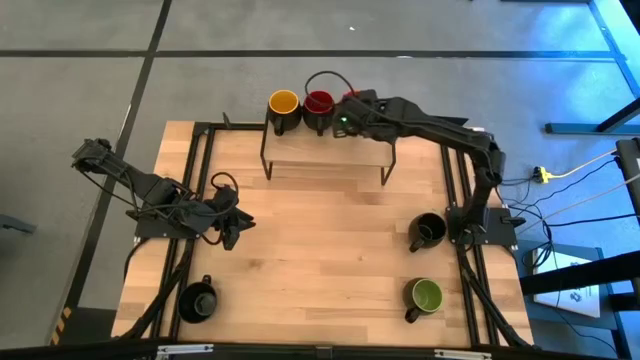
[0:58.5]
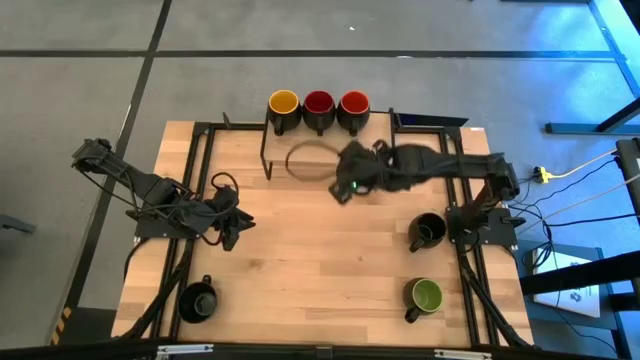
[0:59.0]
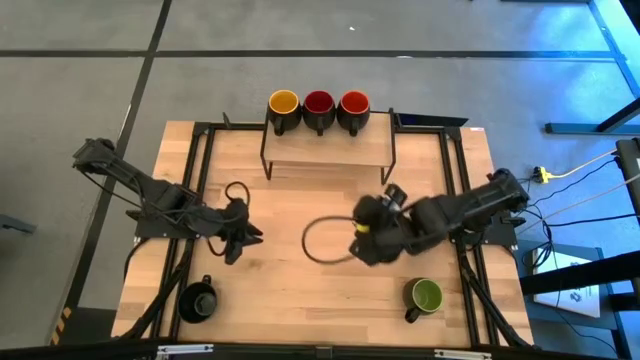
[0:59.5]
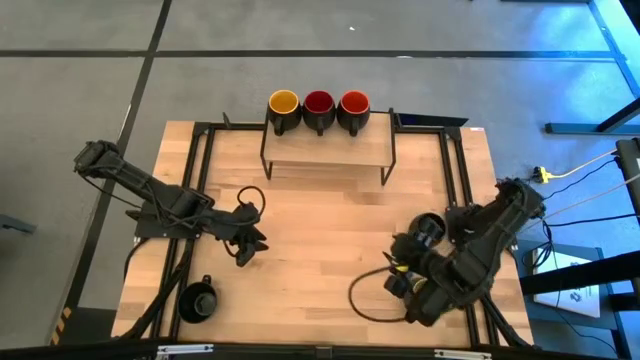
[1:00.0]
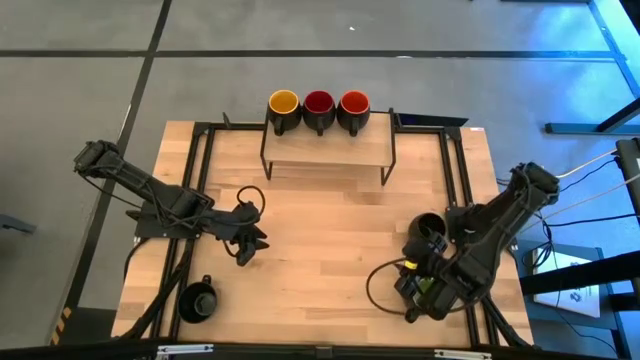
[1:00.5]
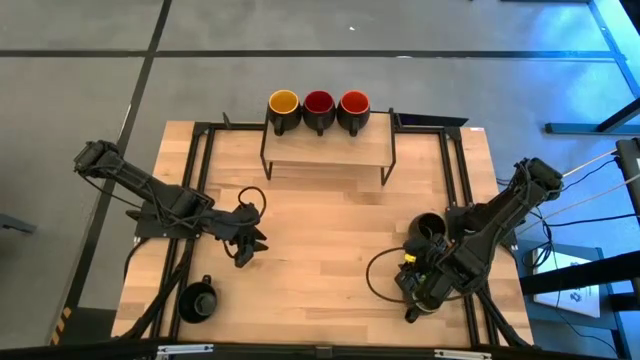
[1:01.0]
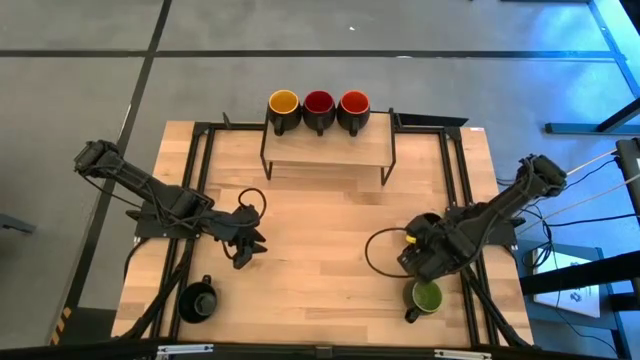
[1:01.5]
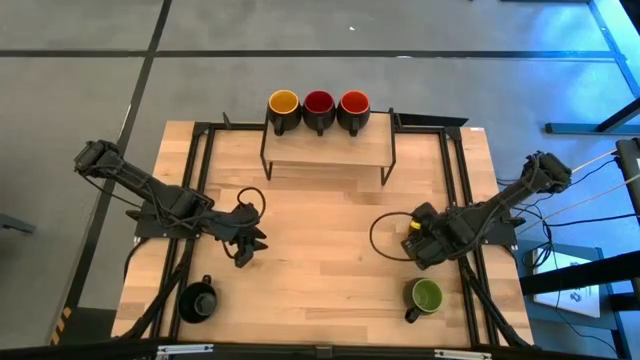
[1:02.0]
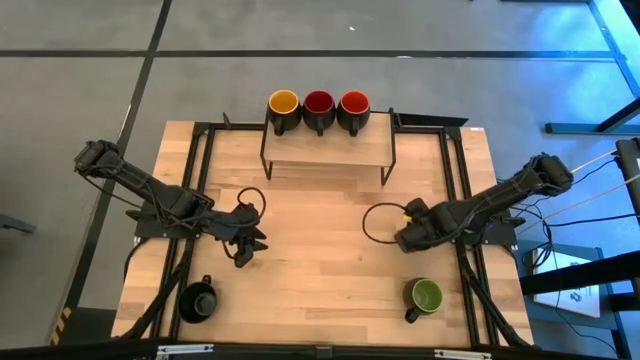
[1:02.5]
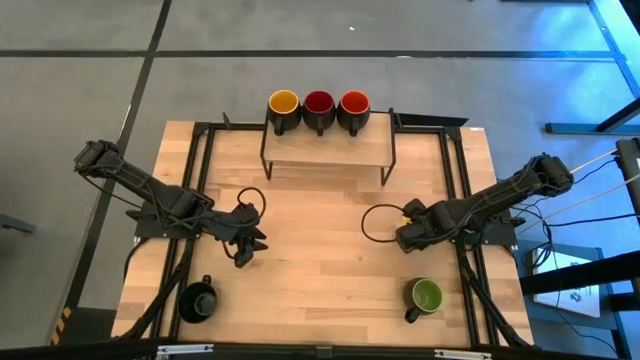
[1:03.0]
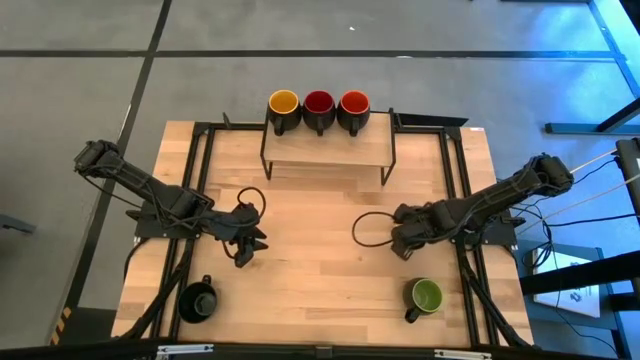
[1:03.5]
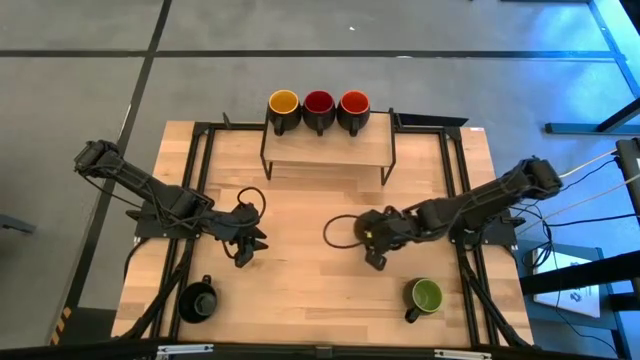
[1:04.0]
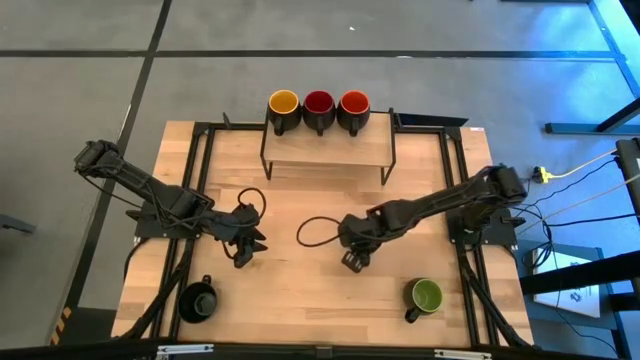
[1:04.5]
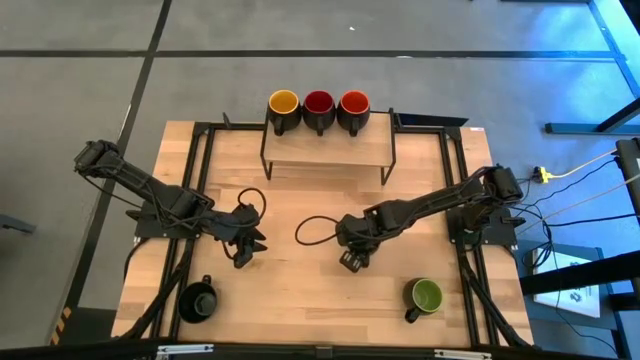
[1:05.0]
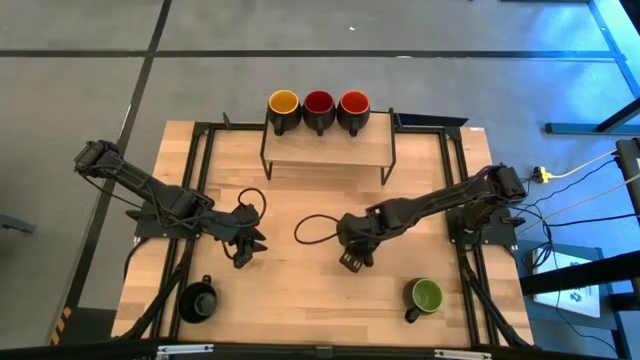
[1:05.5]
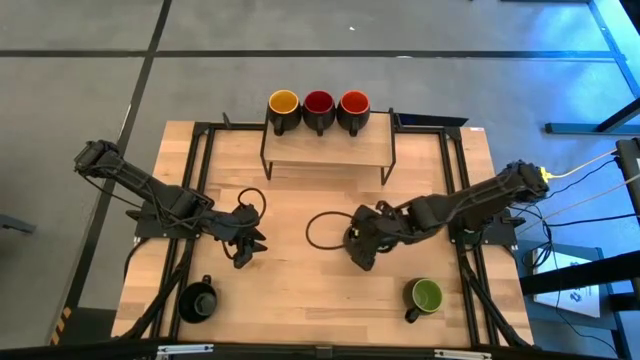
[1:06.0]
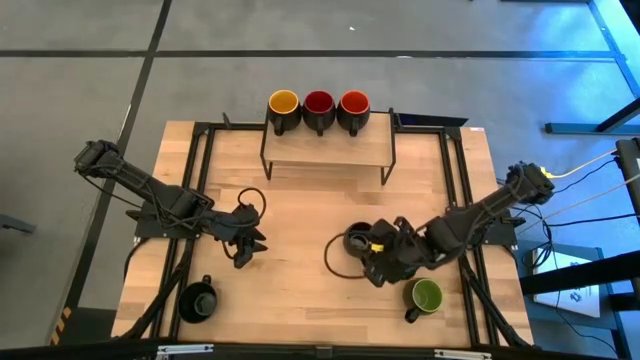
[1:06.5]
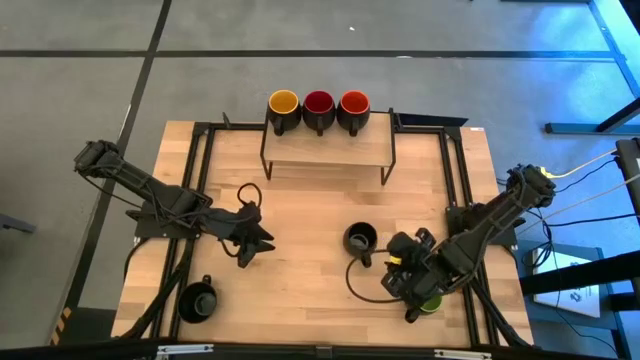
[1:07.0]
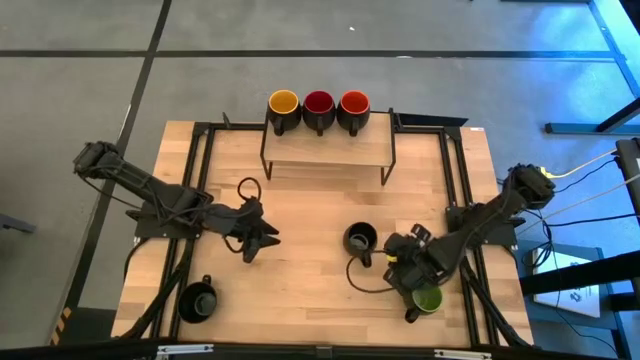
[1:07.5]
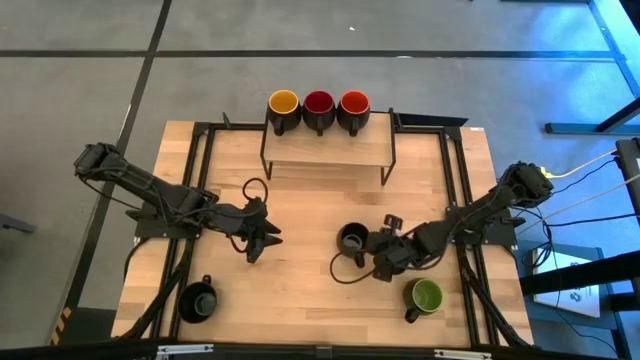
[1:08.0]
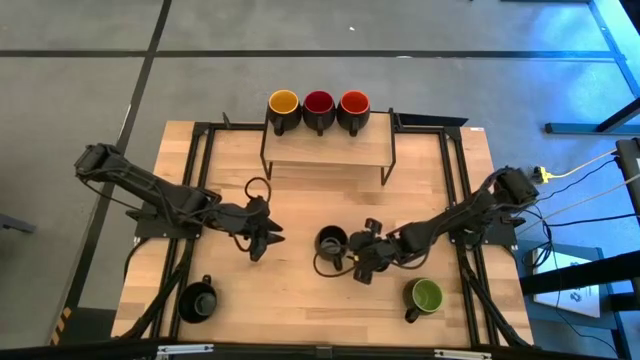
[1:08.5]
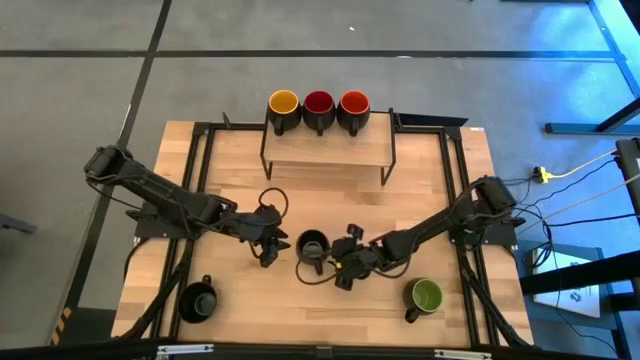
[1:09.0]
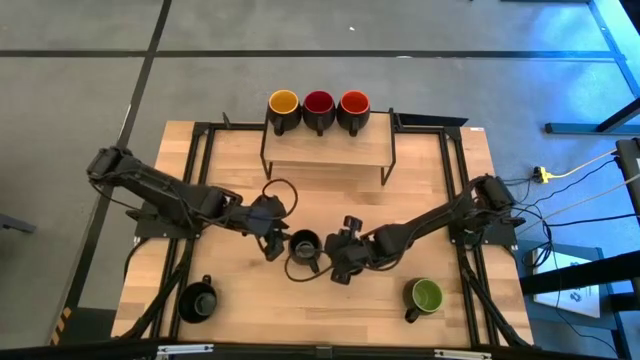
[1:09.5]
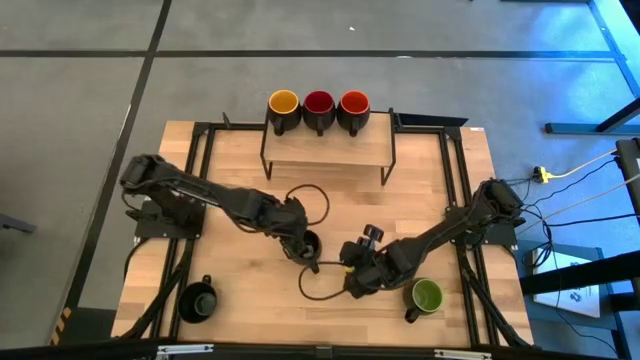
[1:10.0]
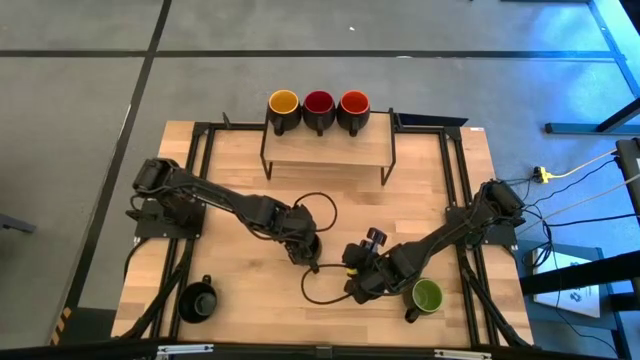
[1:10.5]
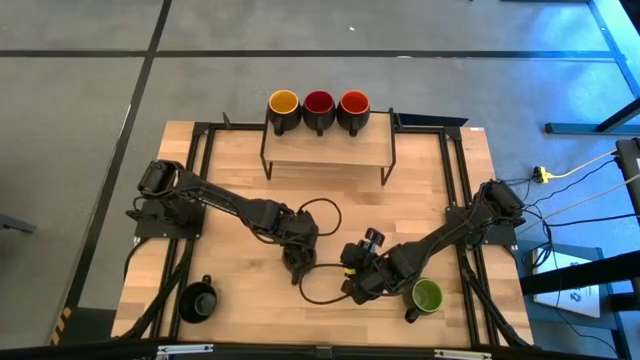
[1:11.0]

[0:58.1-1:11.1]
Task: Place coffee mugs
Put the top black mug on the shelf

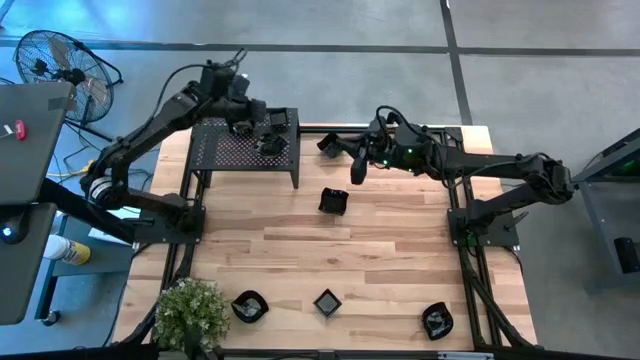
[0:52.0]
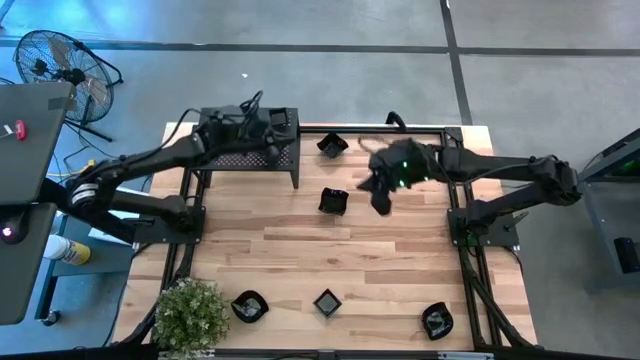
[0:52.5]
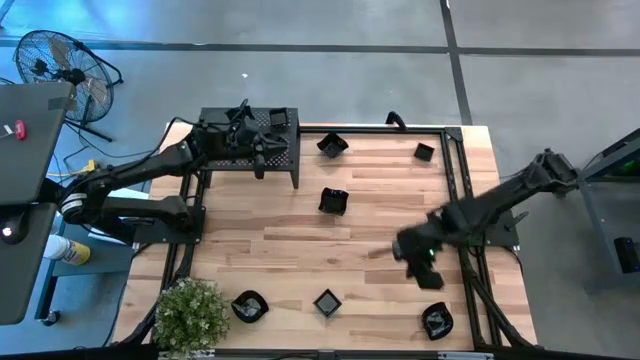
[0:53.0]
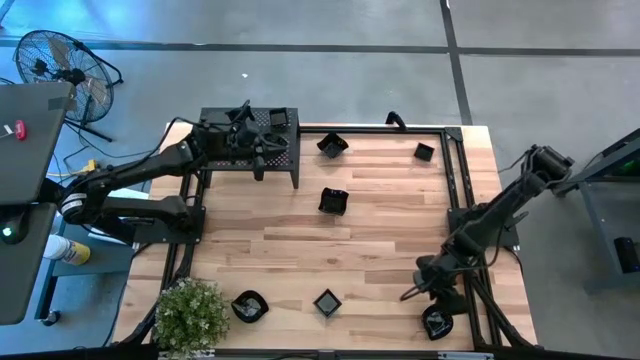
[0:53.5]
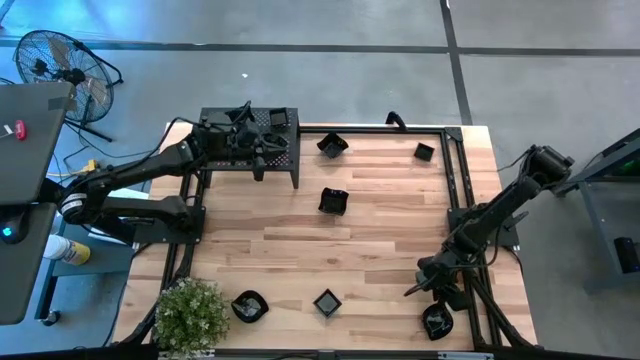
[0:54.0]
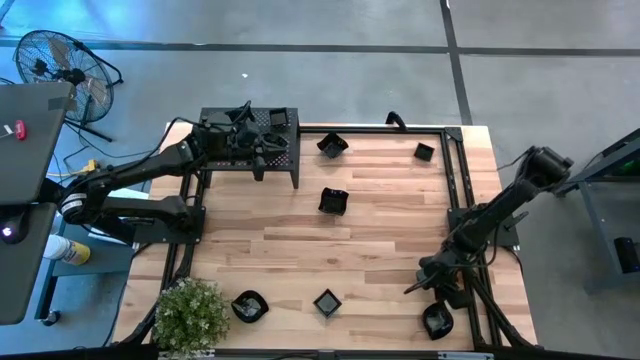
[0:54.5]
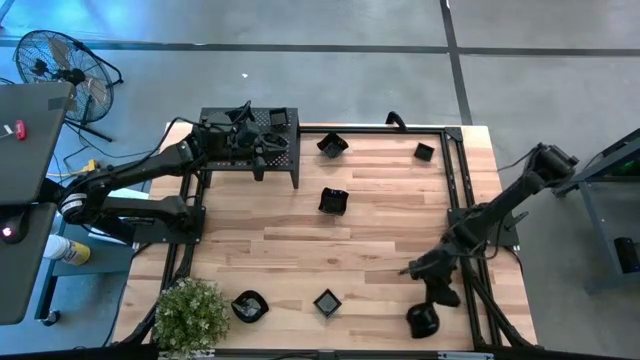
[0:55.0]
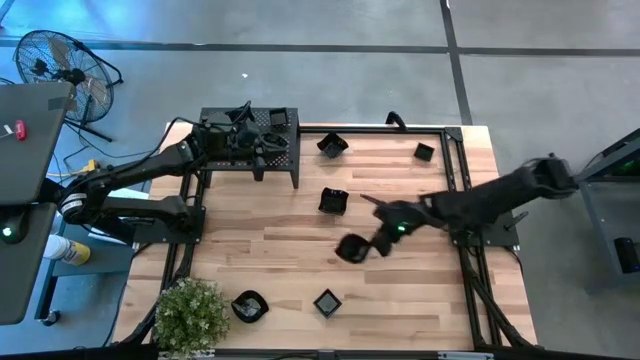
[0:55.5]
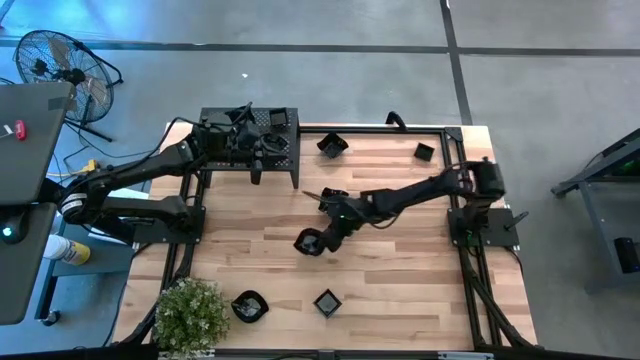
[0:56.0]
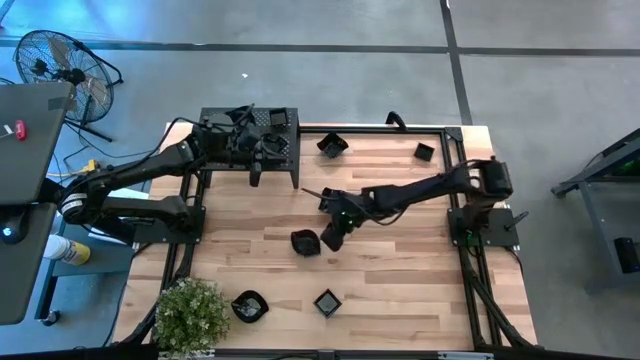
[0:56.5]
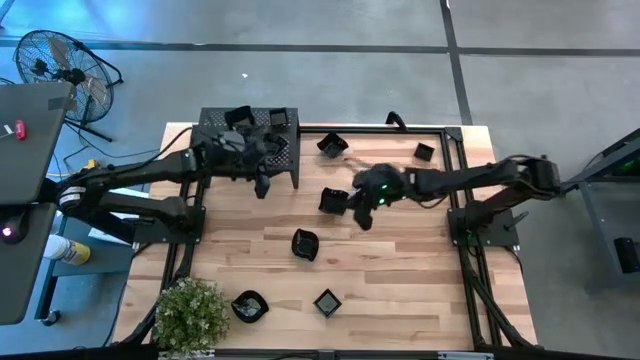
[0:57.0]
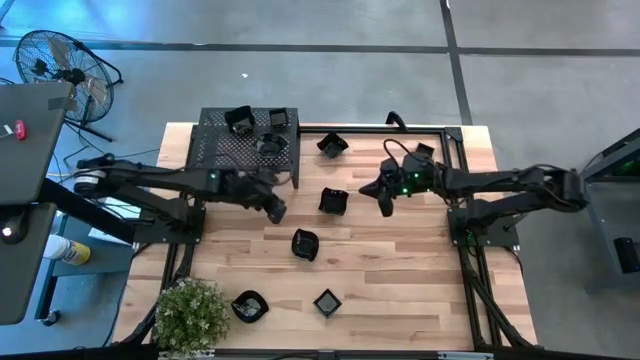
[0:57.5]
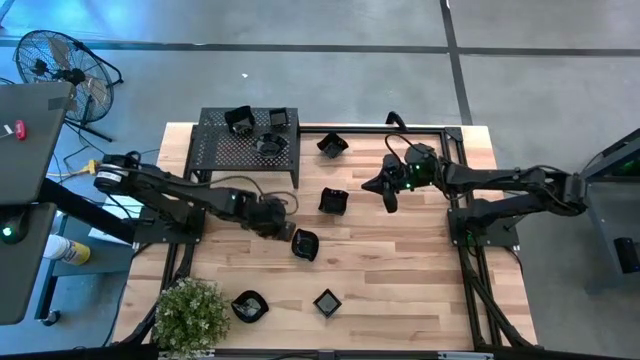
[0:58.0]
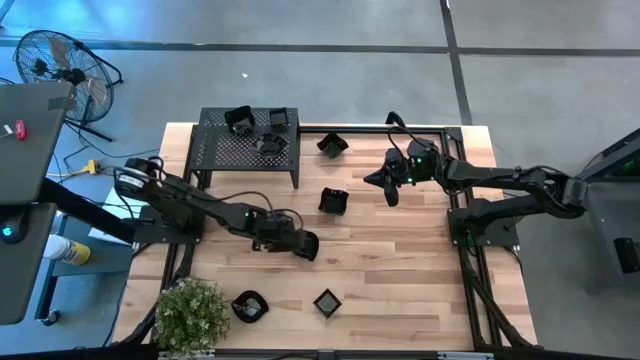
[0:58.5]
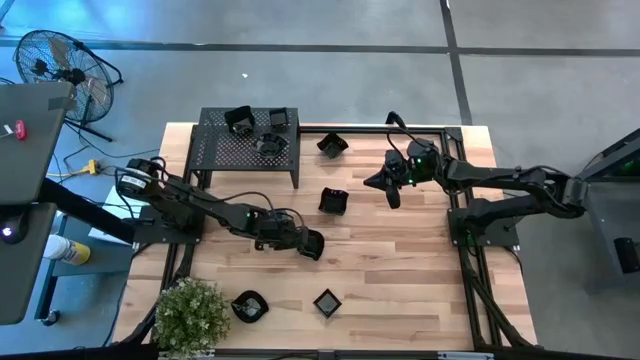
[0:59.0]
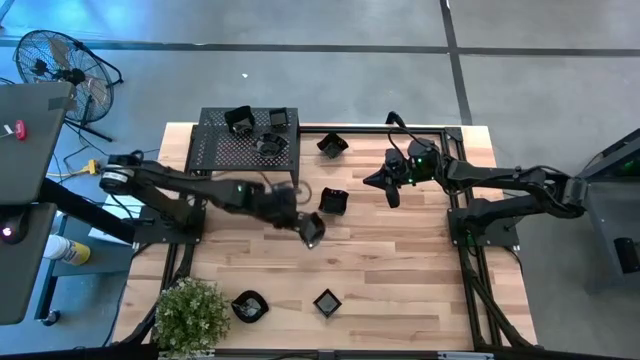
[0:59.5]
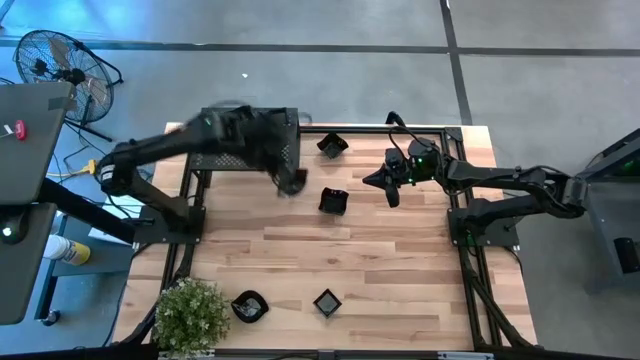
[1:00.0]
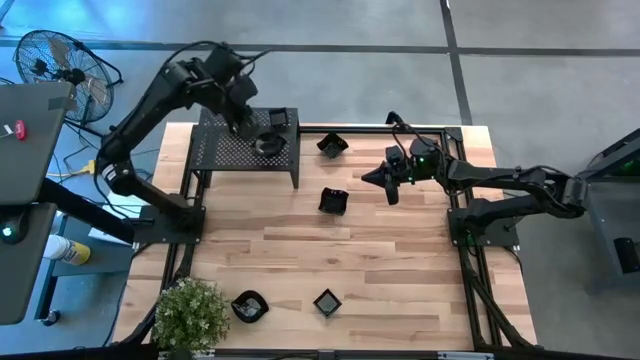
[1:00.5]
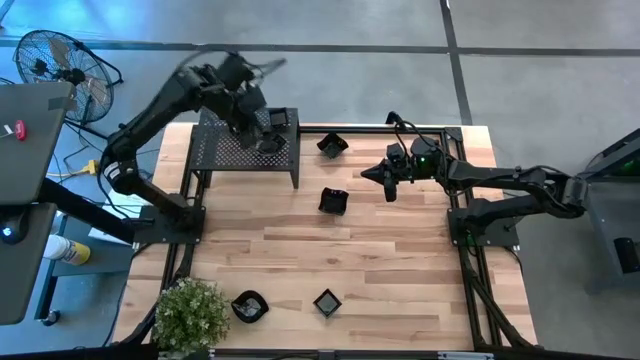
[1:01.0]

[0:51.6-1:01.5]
Task: Pick & Place Mini shaped plates
Stack the leaf-shaped plate on top of the other leaf-shaped plates on the shelf
